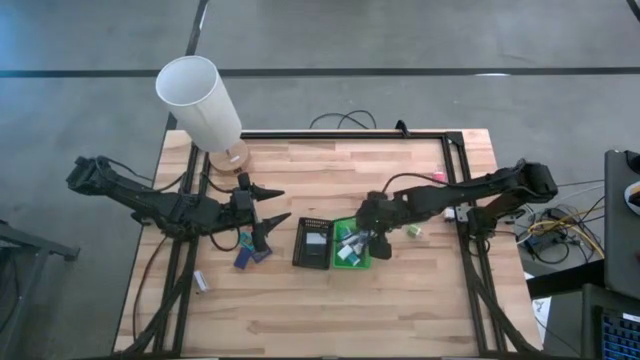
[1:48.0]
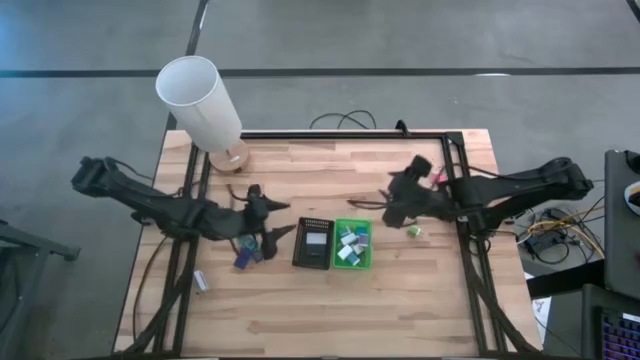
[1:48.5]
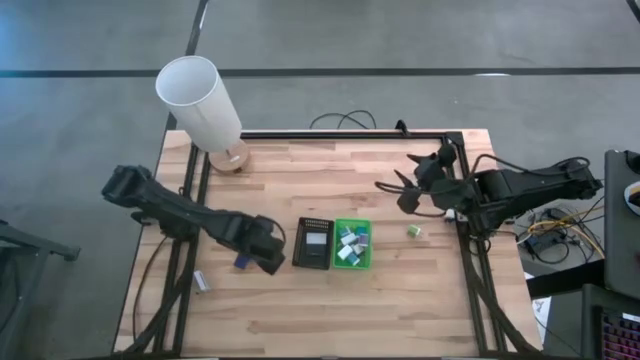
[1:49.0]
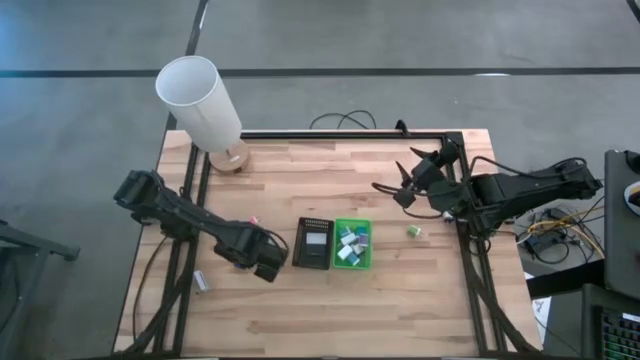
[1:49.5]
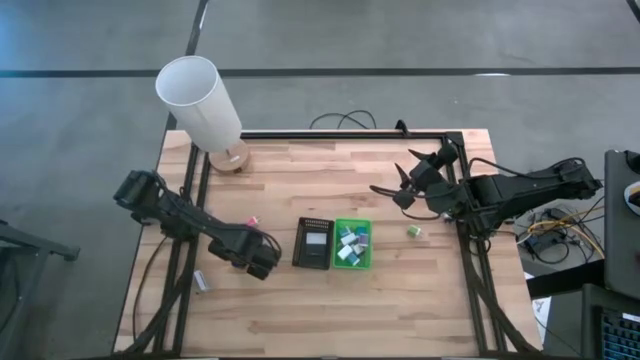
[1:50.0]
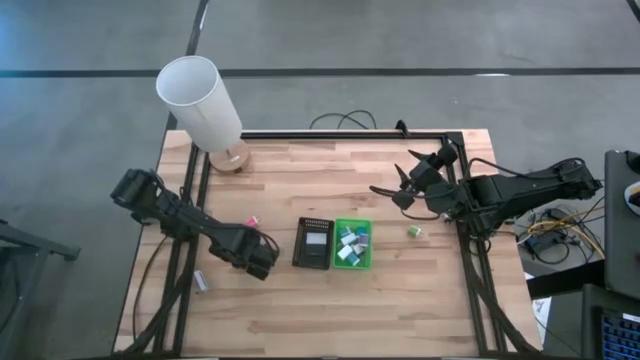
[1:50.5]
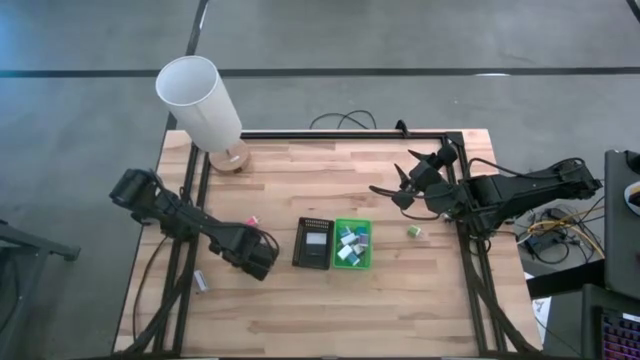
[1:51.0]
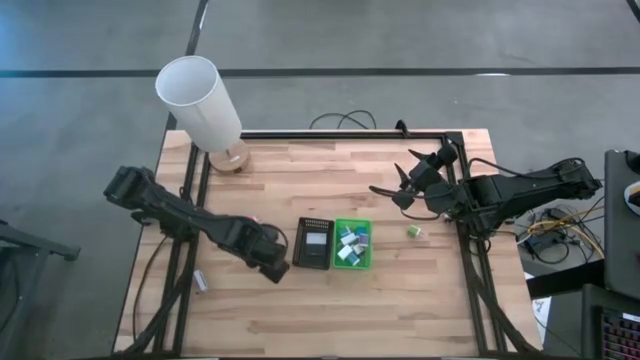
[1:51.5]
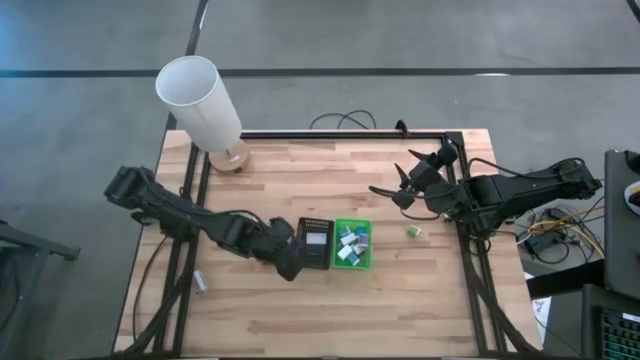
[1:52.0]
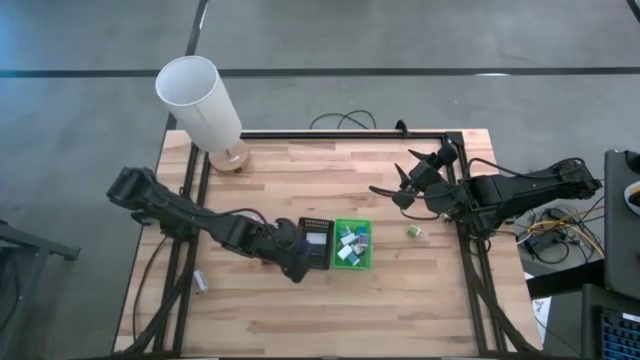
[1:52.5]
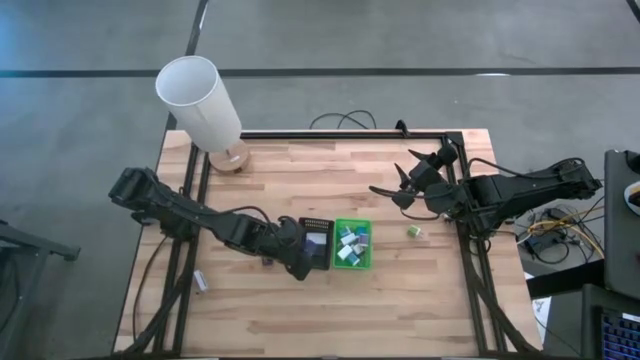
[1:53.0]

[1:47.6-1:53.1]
Task: Pick & Place Office items
Put the left dark blue digital clock into the black basket

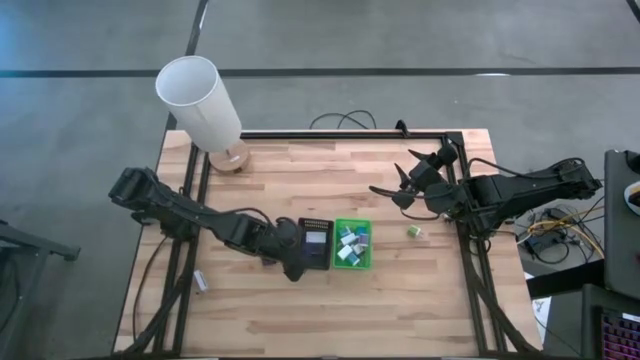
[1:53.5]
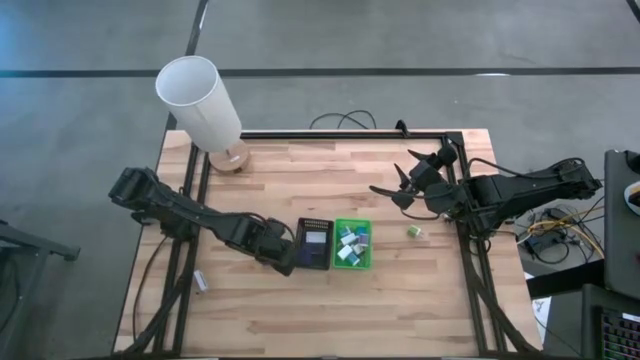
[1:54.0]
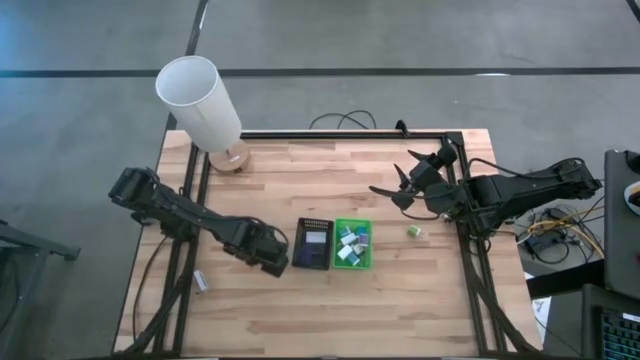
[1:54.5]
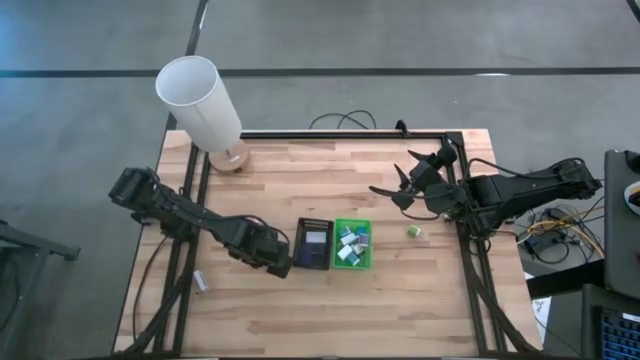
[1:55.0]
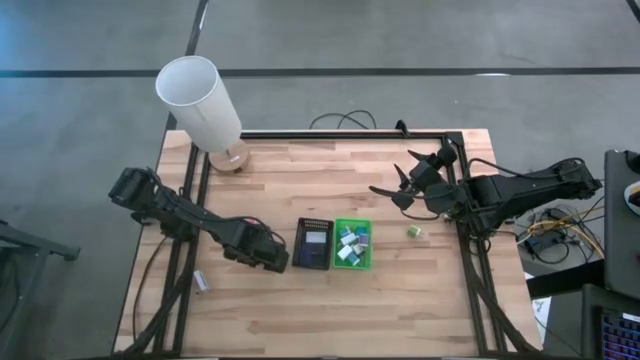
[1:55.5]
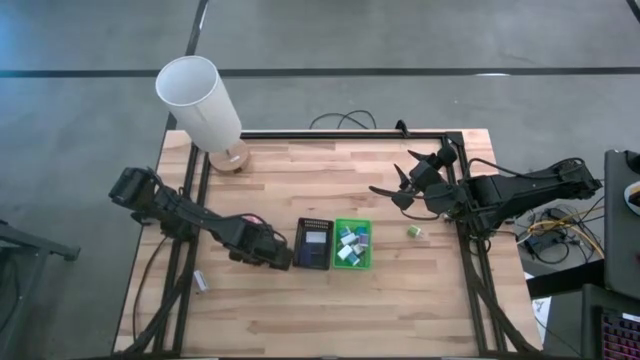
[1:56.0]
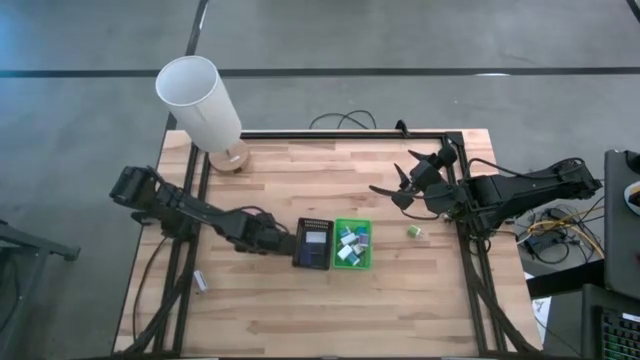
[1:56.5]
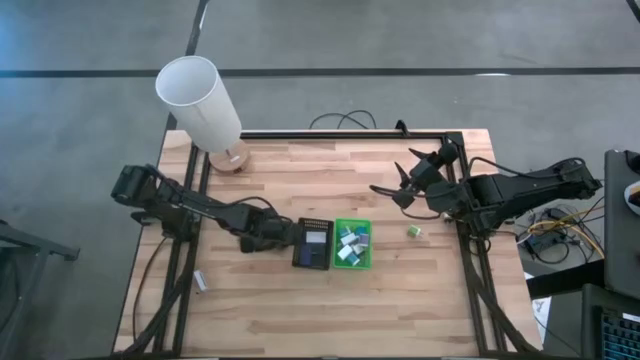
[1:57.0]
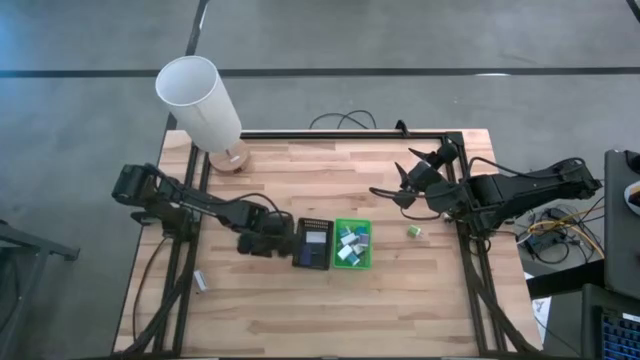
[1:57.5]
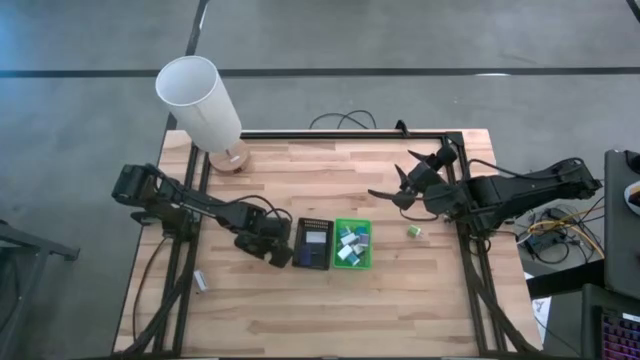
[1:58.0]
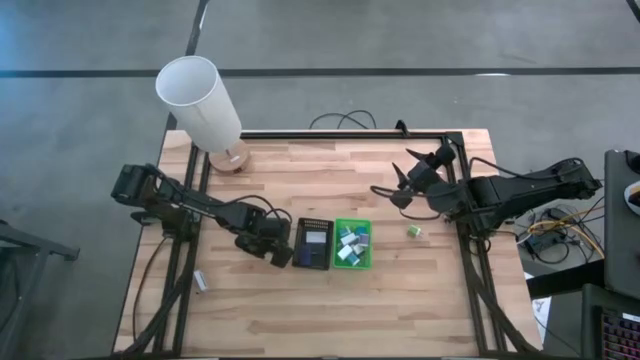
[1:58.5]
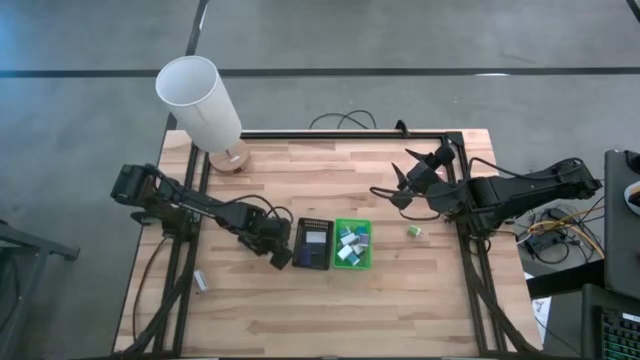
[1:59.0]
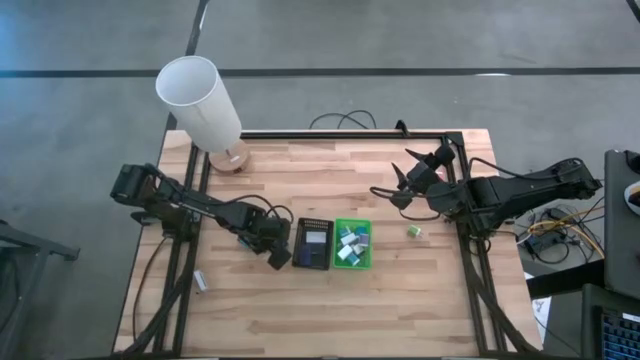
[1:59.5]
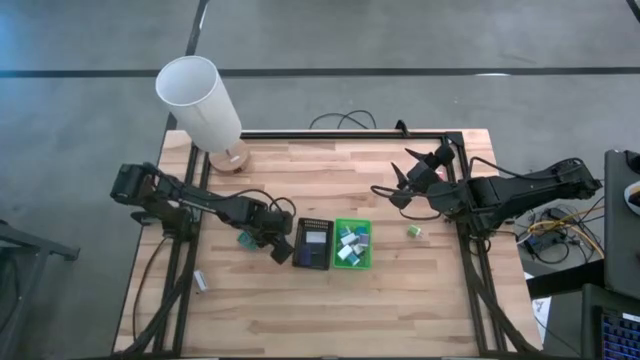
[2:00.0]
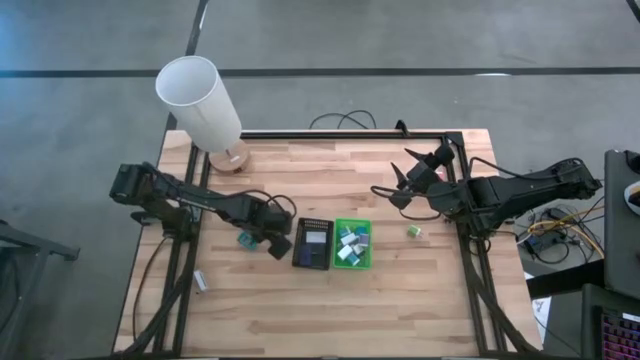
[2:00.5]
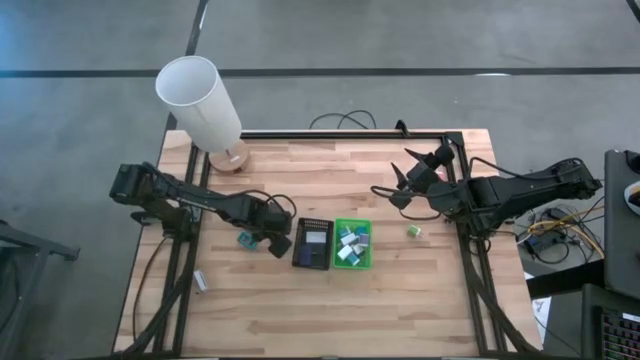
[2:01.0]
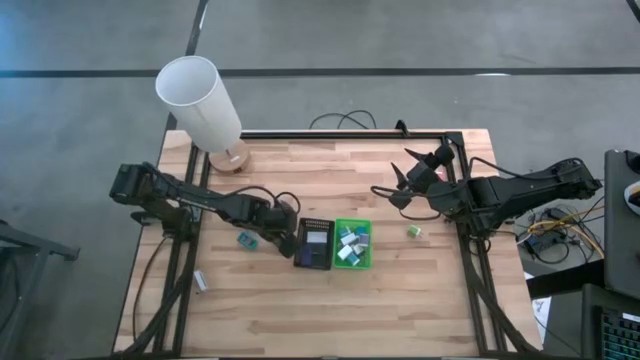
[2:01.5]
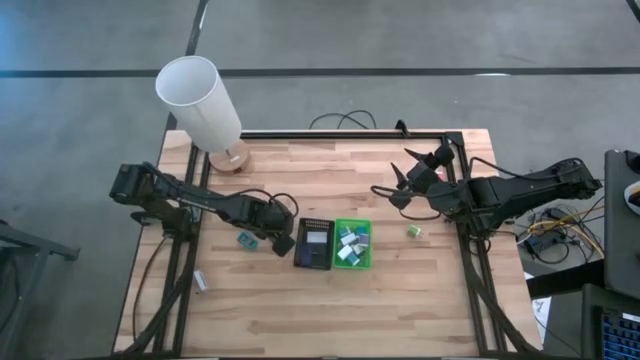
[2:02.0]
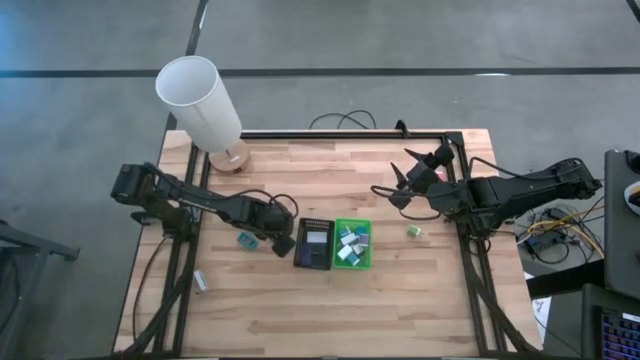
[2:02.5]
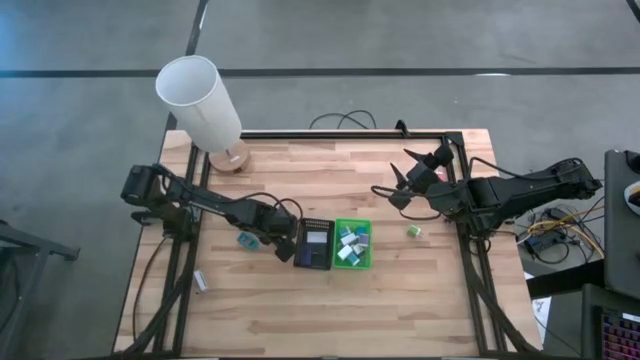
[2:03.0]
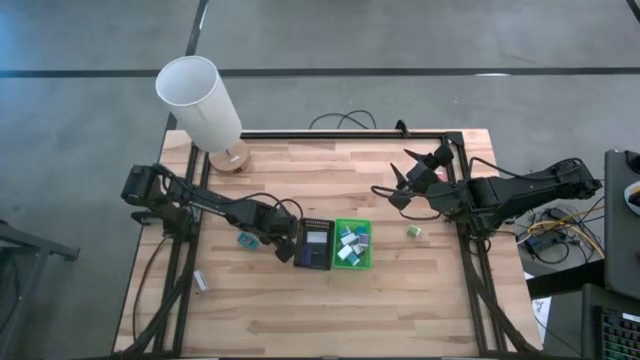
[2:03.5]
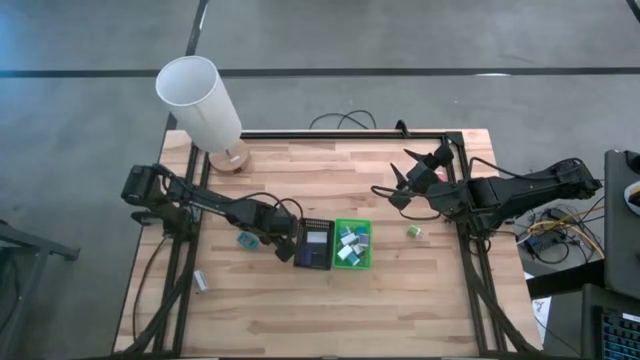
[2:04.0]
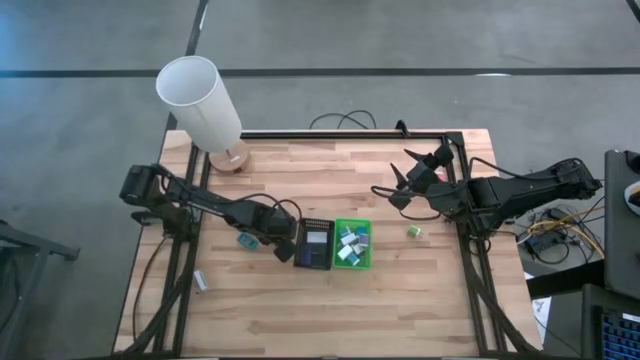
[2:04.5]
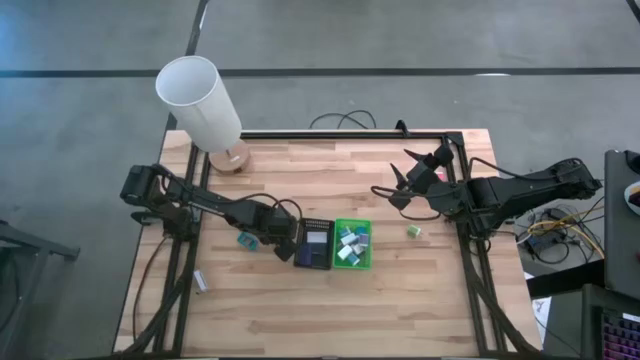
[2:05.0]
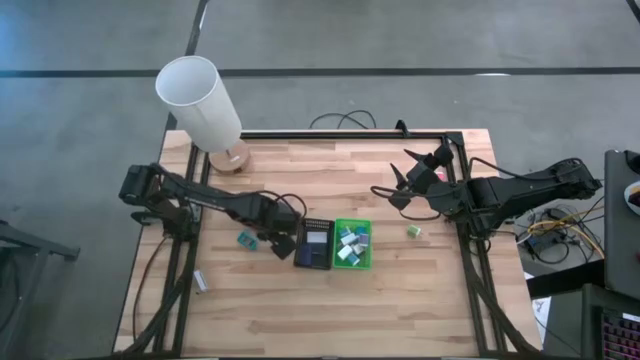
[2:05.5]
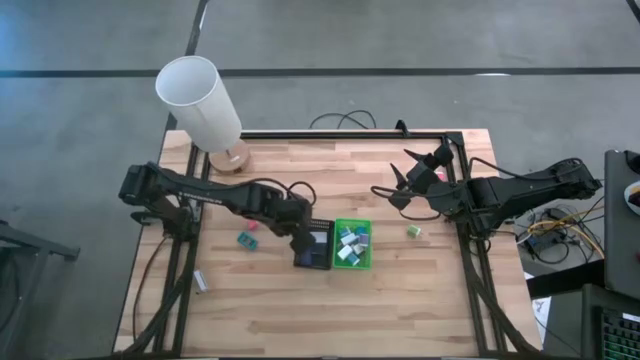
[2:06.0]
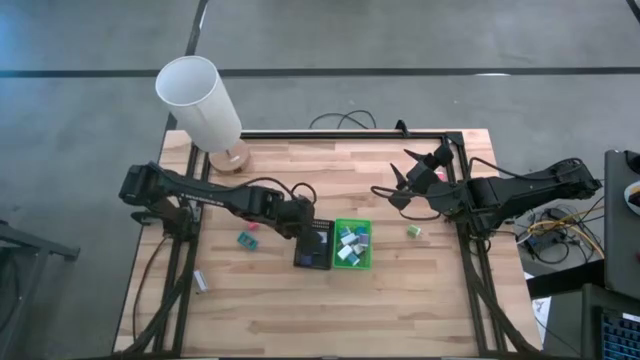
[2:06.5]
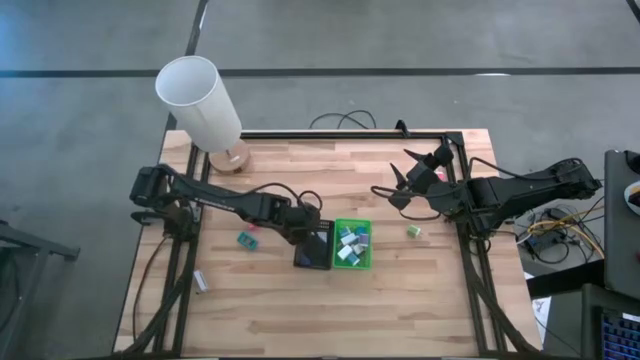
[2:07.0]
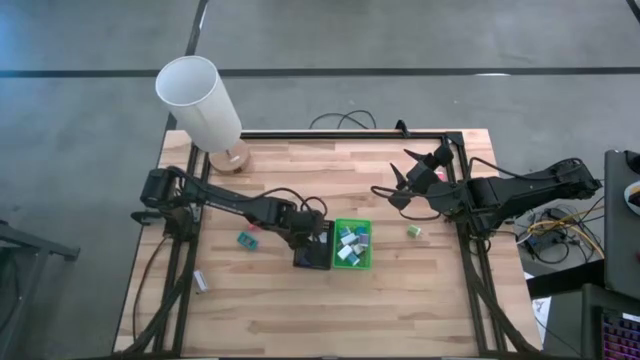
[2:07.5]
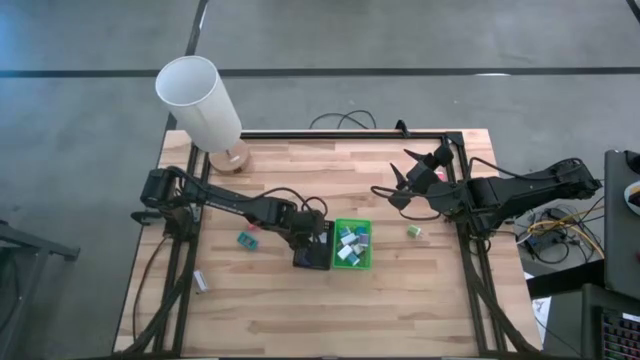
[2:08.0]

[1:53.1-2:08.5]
Put the dark blue digital clock into the black basket
